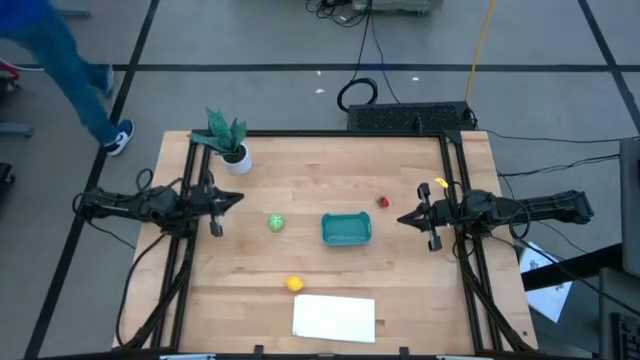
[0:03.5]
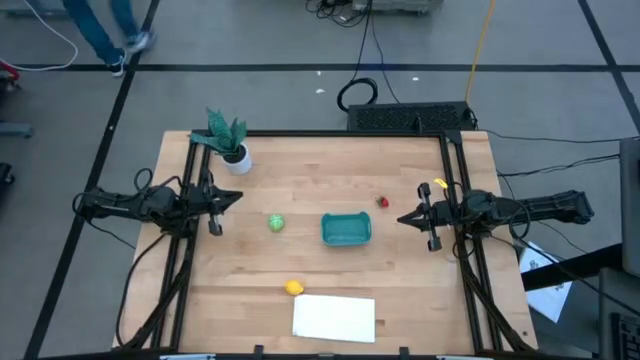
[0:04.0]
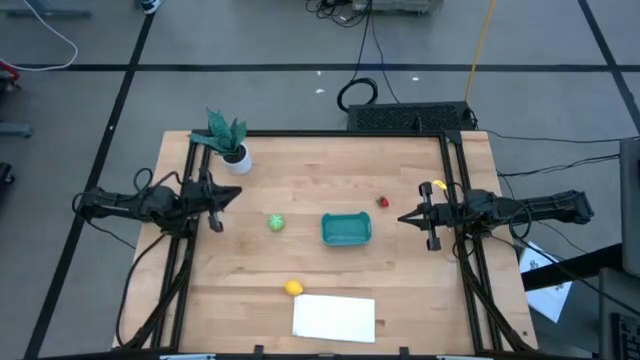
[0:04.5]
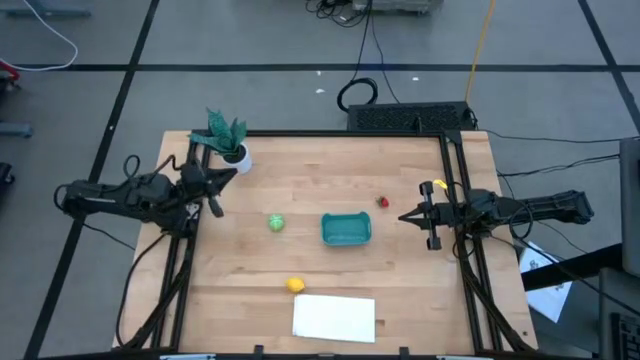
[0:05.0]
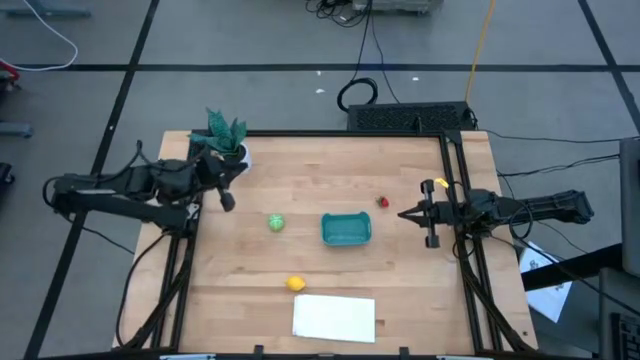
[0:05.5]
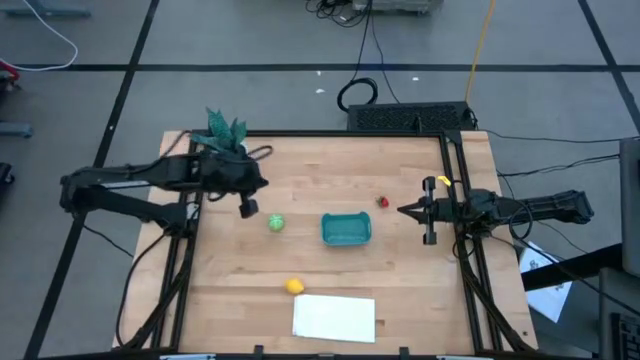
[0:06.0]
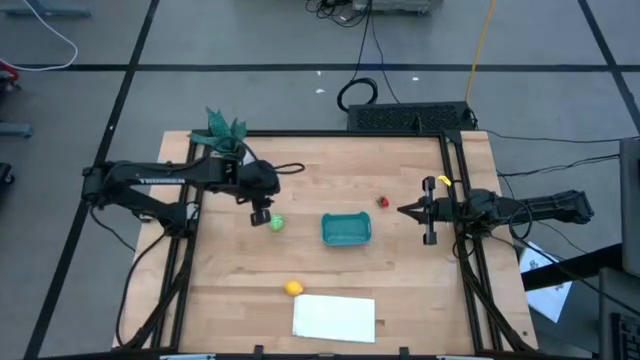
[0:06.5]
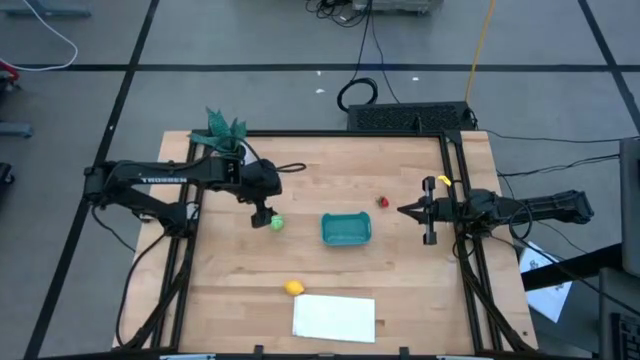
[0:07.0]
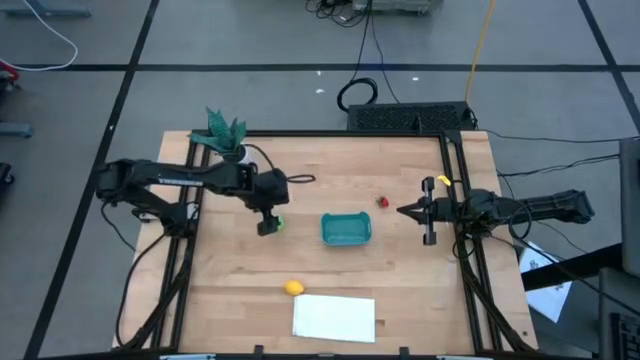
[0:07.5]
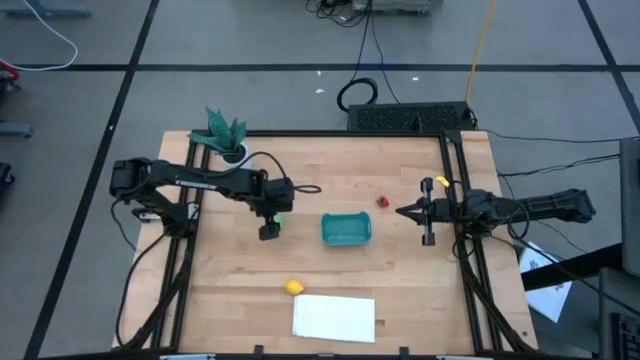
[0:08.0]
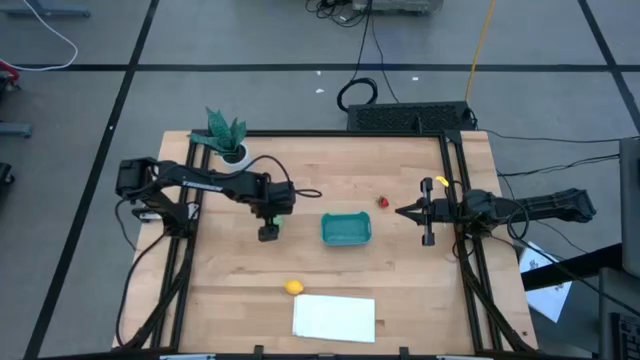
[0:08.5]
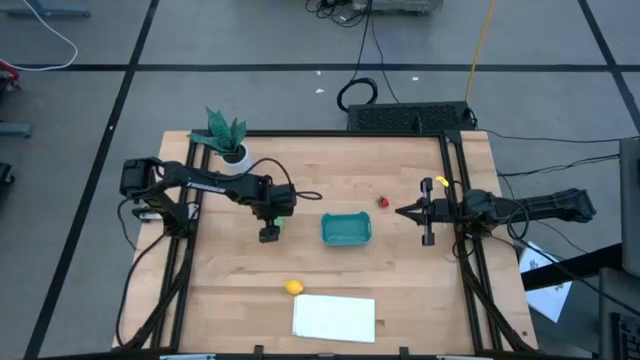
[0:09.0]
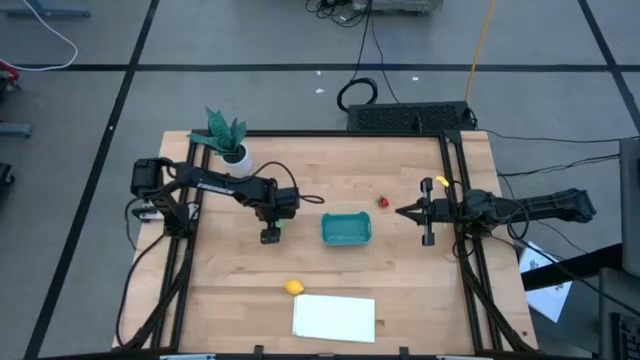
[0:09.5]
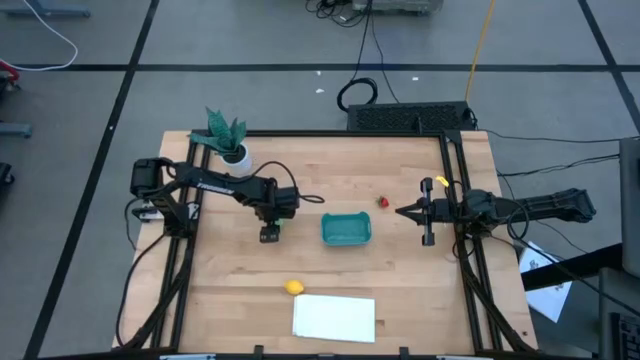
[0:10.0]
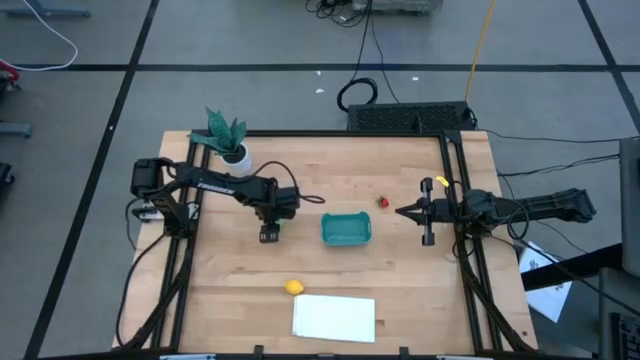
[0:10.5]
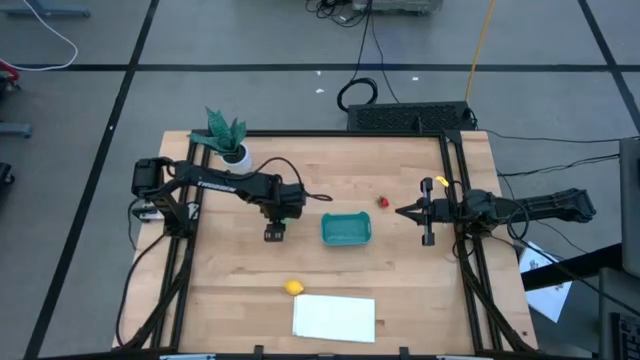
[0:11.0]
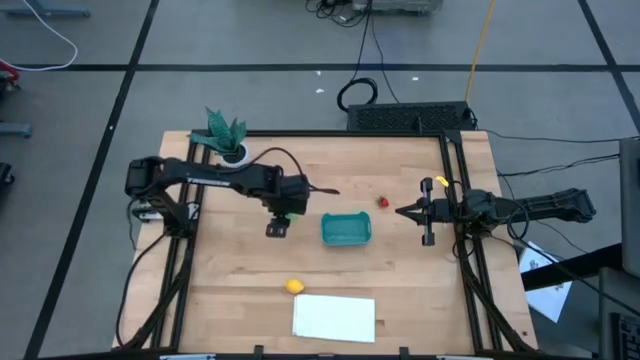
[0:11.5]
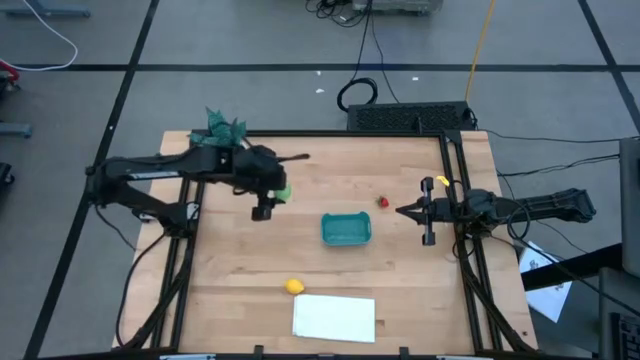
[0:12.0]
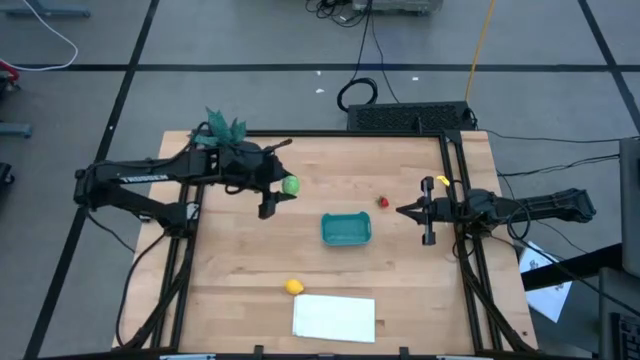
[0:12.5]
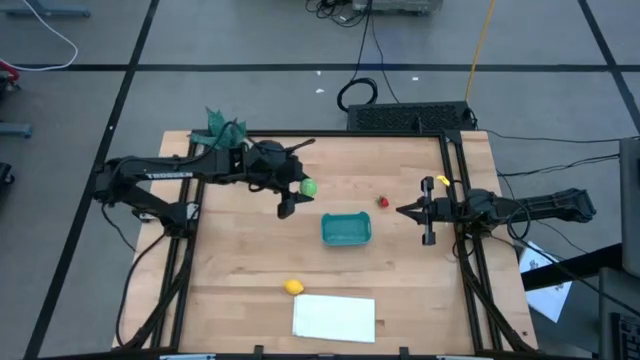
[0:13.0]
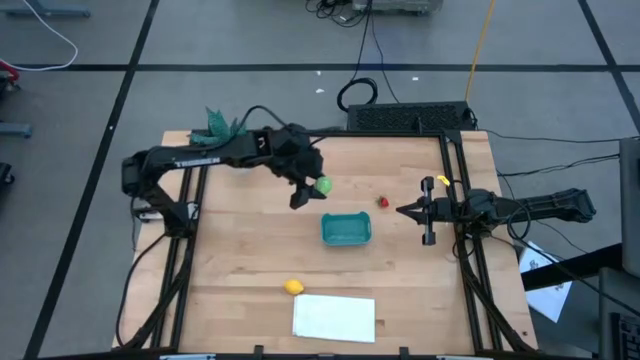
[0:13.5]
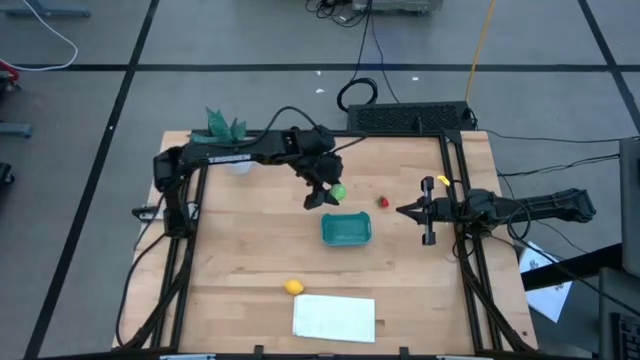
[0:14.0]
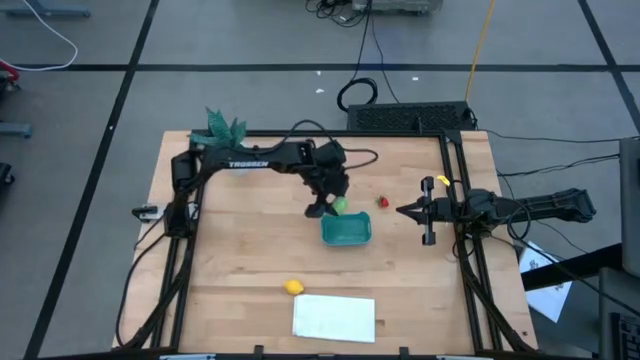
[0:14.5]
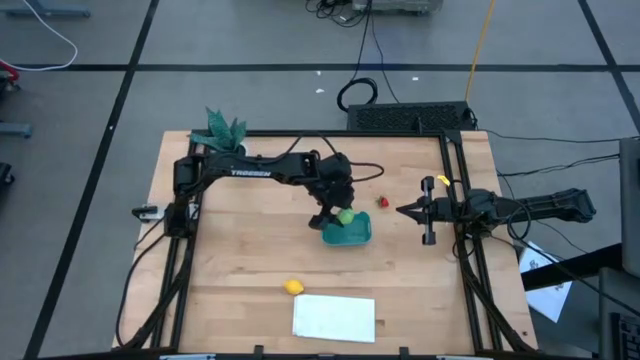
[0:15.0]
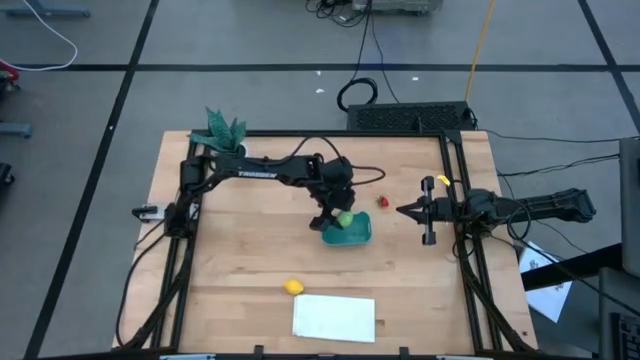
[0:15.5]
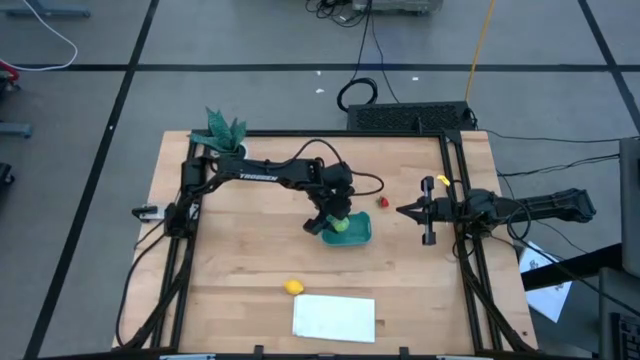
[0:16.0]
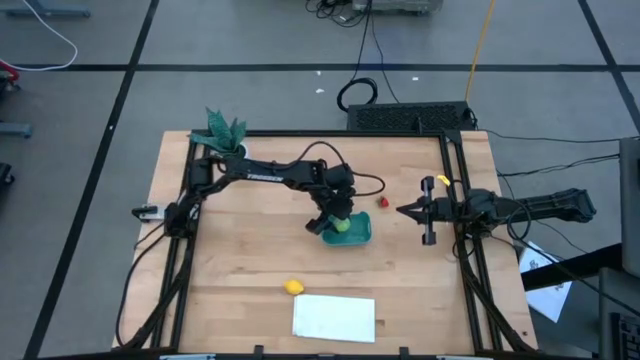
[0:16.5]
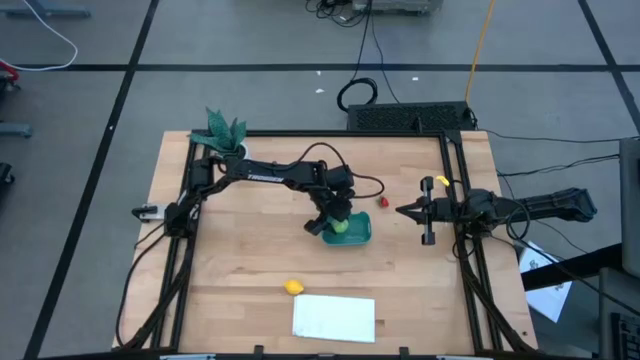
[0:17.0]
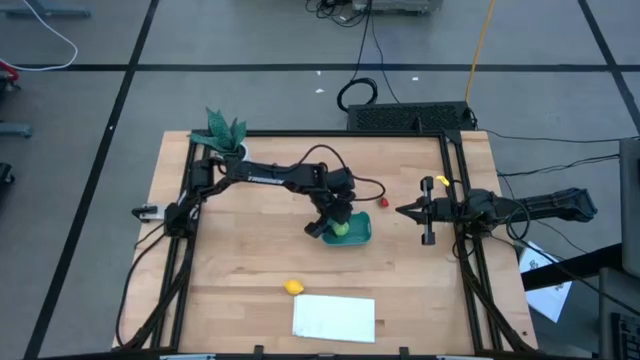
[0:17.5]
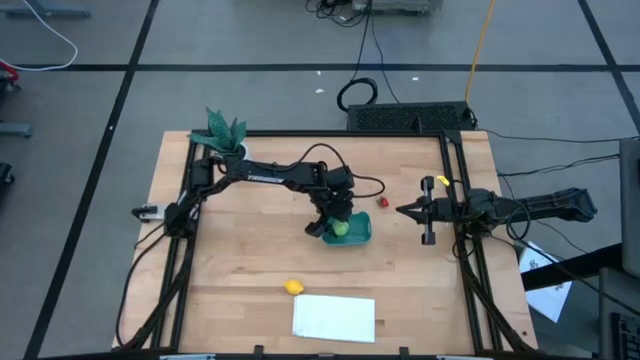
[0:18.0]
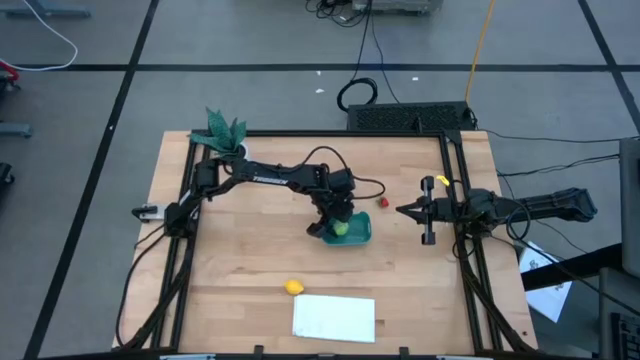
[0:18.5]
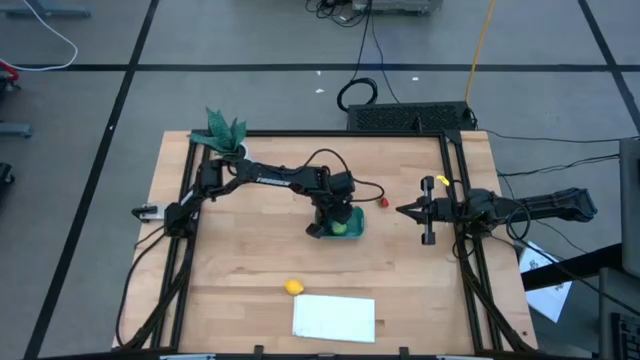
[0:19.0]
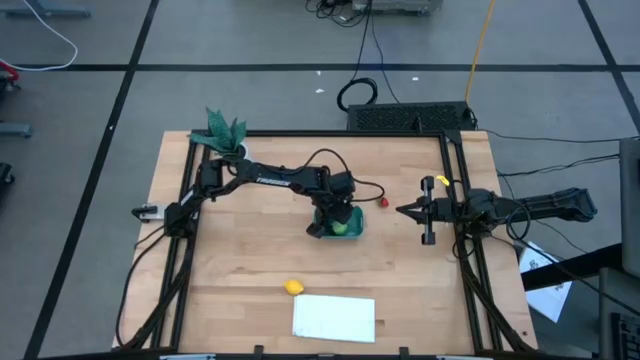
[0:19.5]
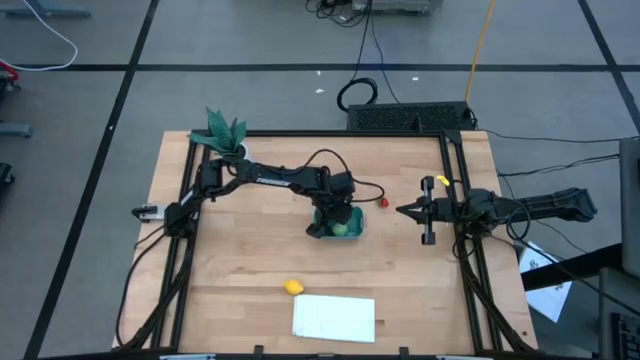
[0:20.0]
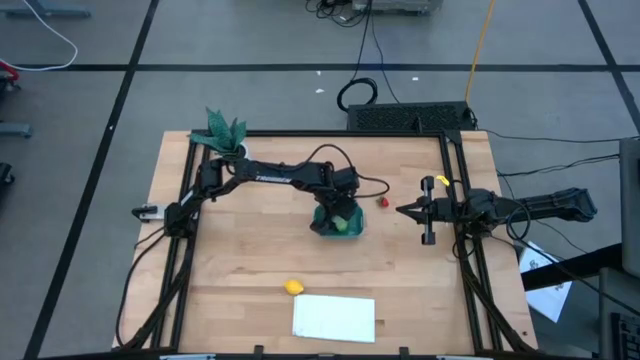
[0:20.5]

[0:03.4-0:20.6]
Task: Pick and placing Produce into tupperware
Put the green cabbage into the blue bin

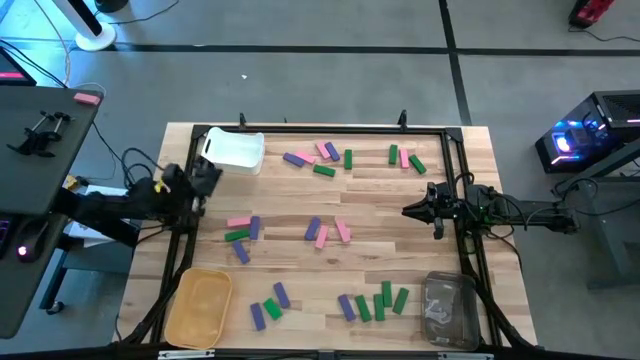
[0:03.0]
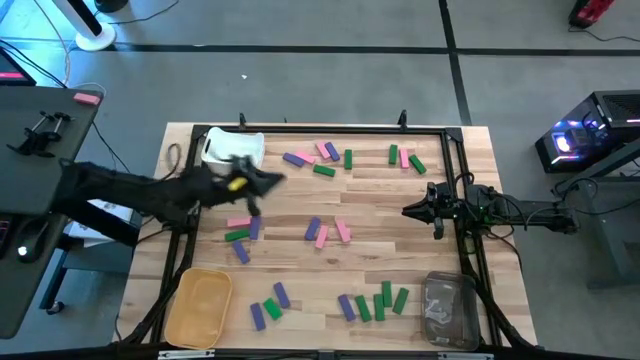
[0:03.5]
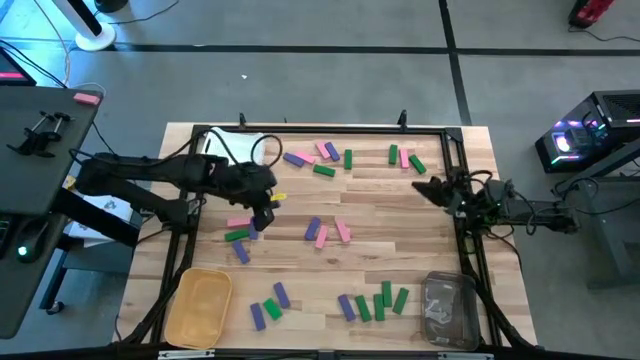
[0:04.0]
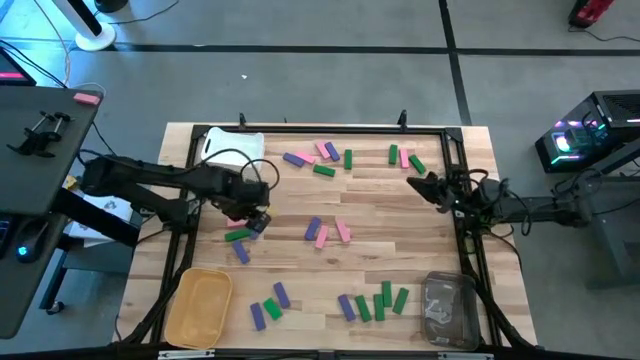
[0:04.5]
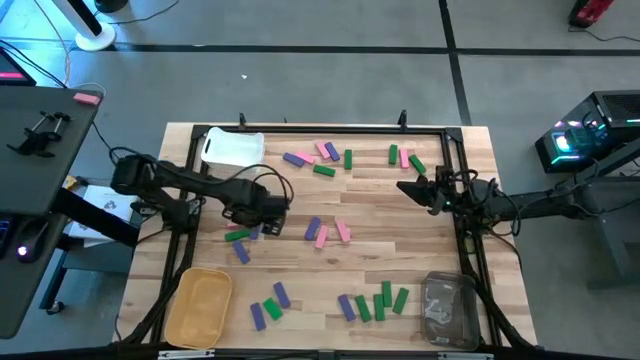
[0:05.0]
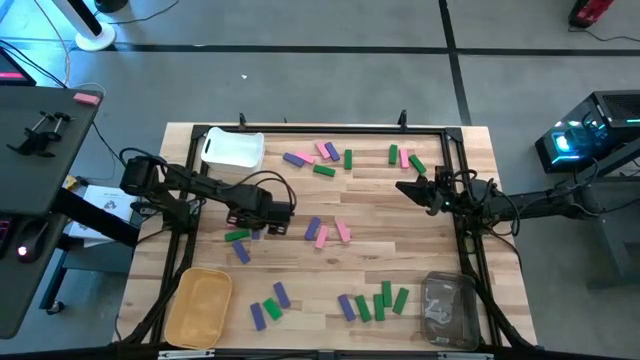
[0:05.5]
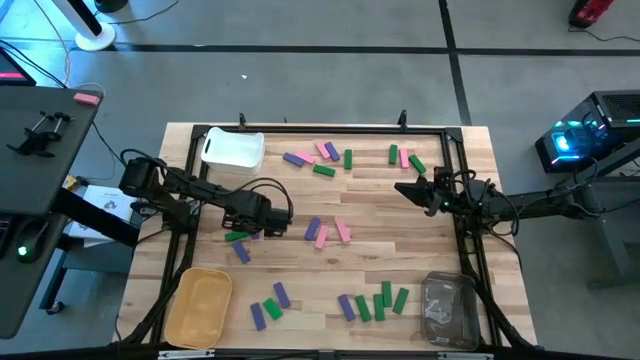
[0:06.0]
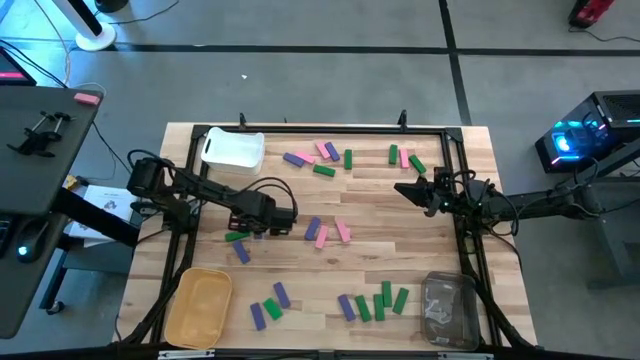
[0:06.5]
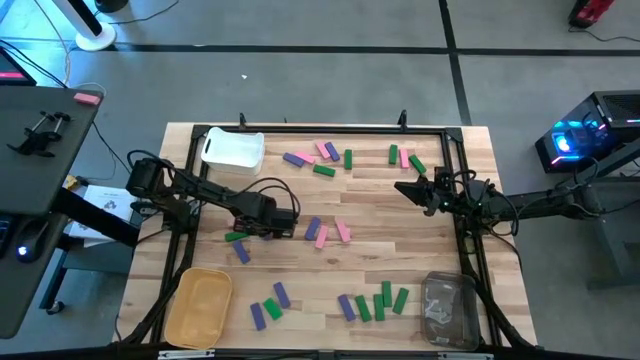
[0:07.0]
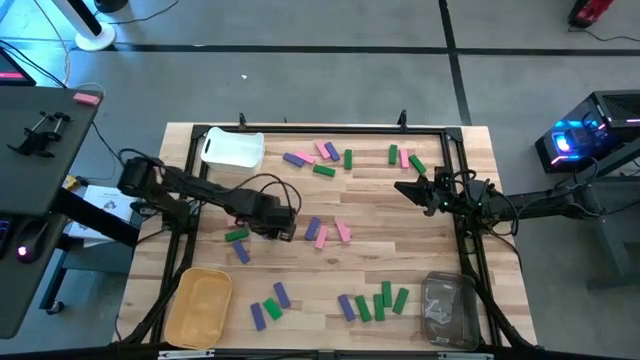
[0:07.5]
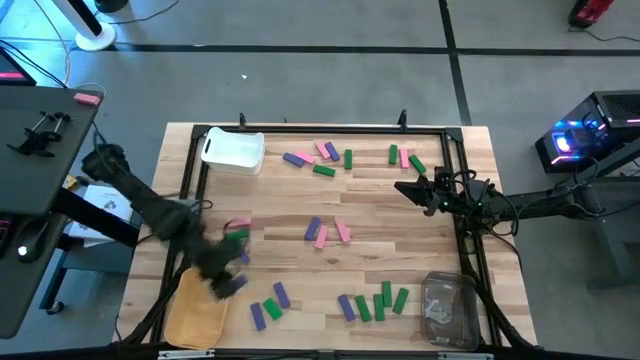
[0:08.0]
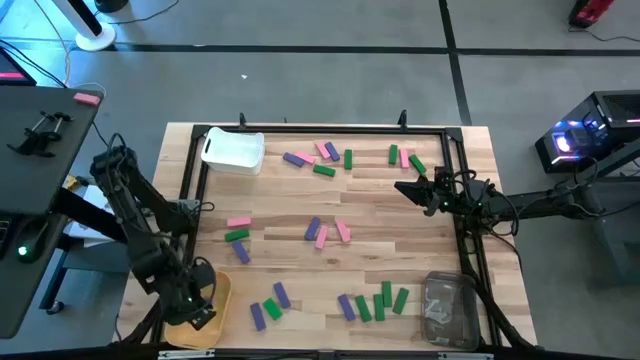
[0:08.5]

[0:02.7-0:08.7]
Task: Sort blocks
Put the violet block into the yellow bin
